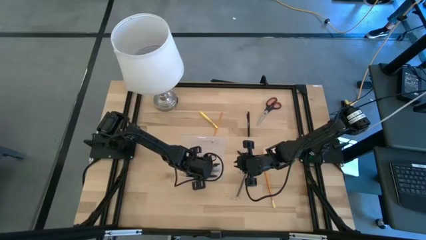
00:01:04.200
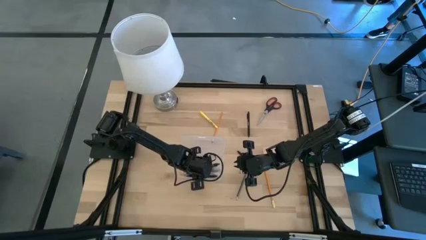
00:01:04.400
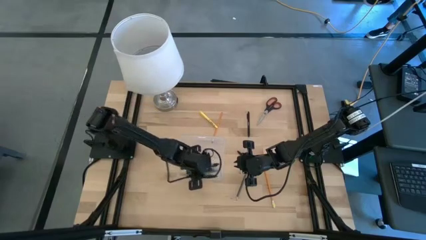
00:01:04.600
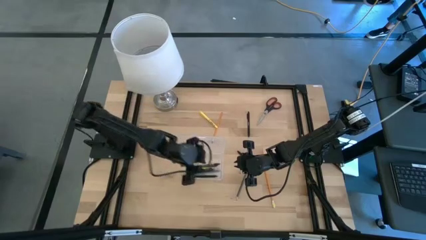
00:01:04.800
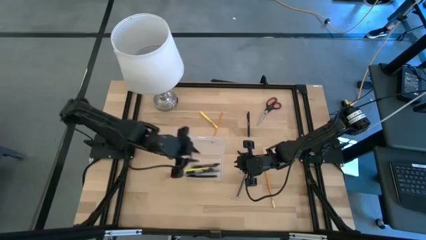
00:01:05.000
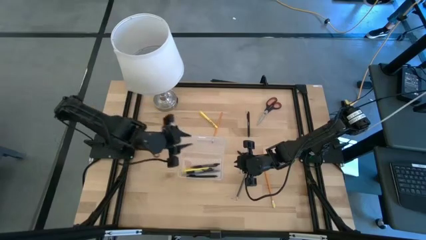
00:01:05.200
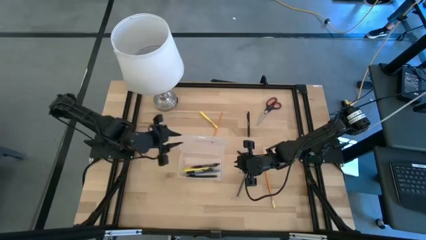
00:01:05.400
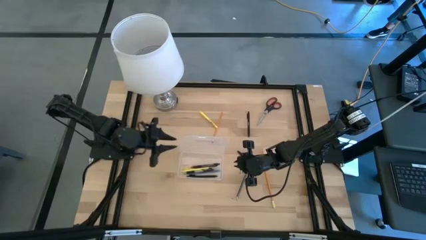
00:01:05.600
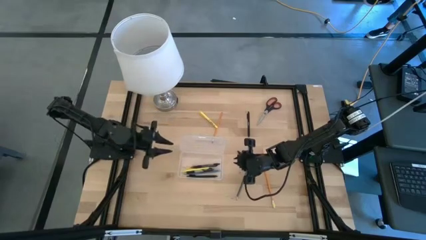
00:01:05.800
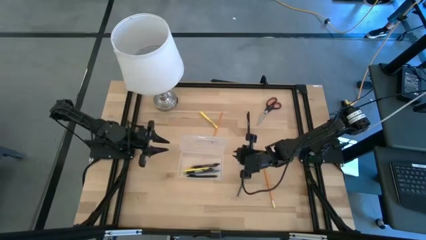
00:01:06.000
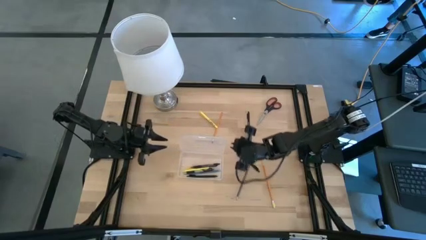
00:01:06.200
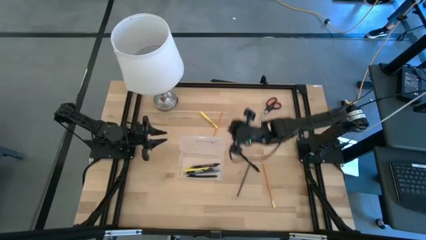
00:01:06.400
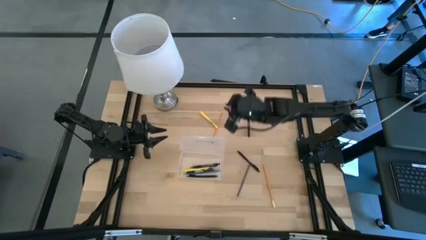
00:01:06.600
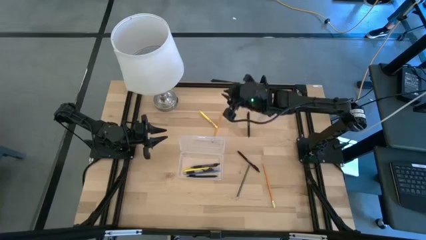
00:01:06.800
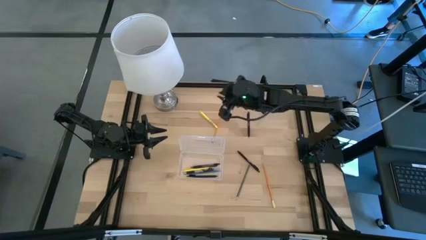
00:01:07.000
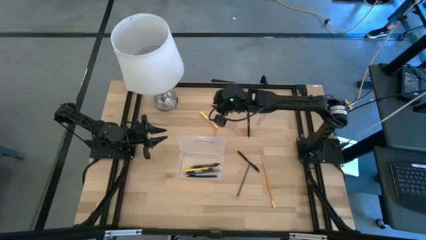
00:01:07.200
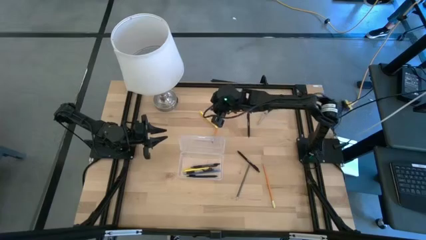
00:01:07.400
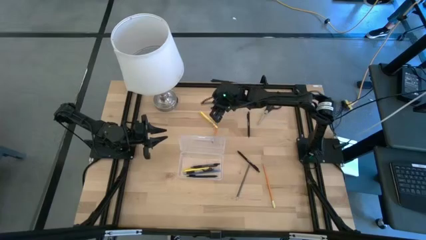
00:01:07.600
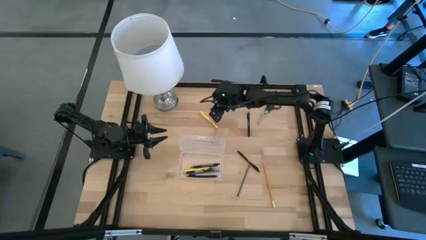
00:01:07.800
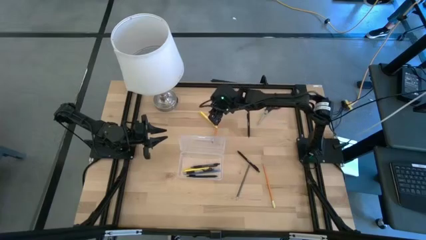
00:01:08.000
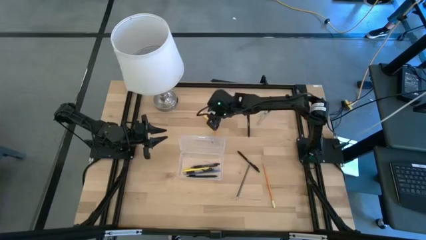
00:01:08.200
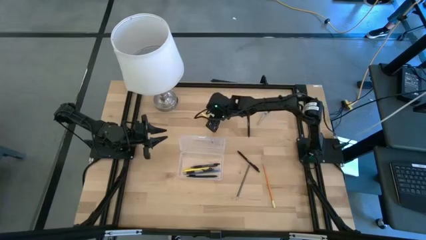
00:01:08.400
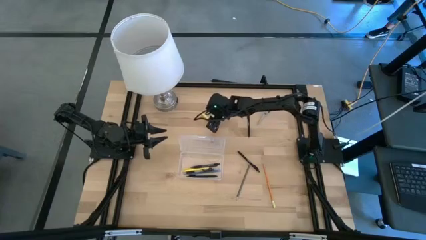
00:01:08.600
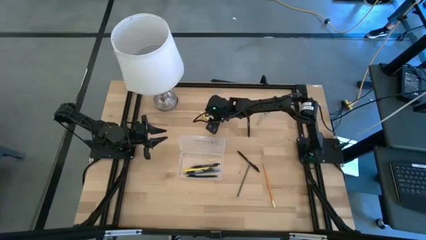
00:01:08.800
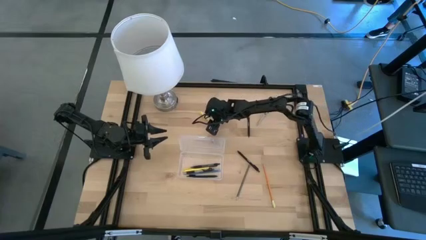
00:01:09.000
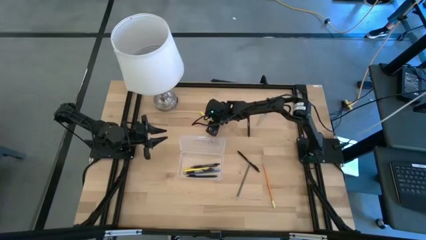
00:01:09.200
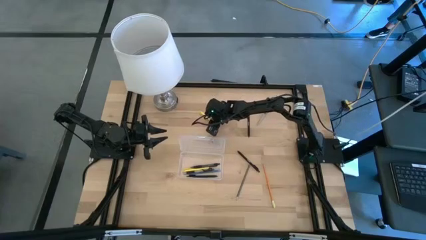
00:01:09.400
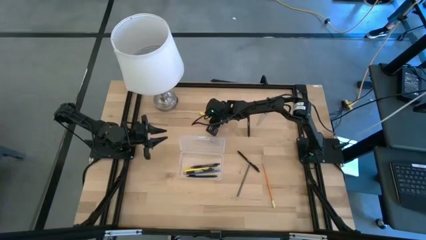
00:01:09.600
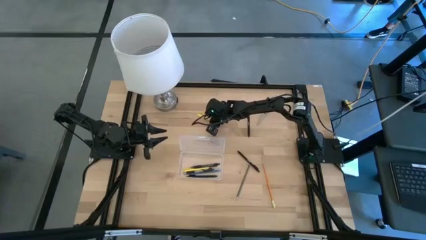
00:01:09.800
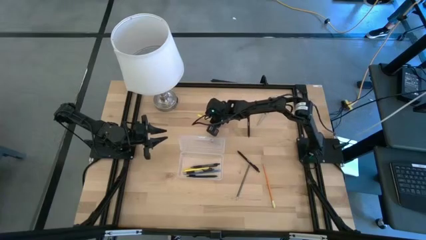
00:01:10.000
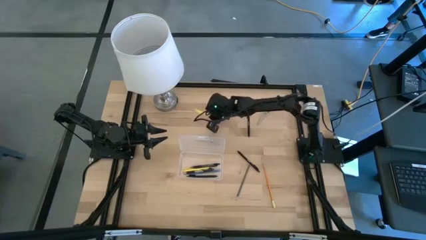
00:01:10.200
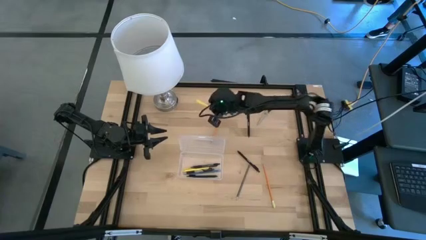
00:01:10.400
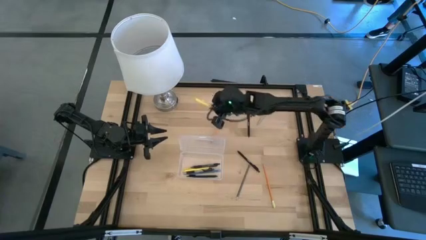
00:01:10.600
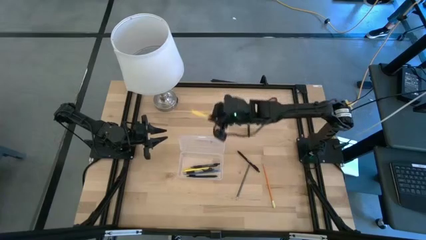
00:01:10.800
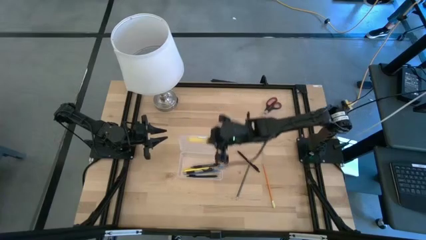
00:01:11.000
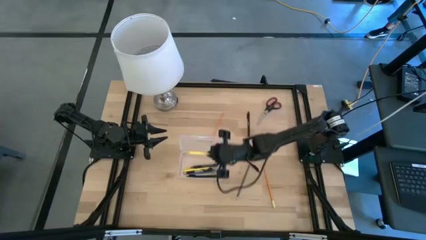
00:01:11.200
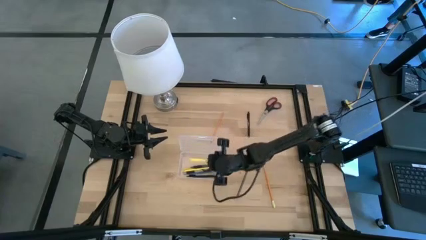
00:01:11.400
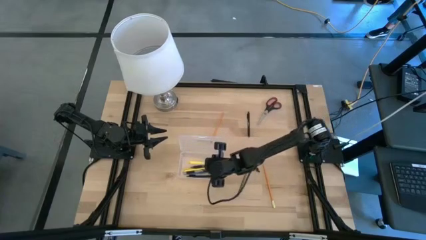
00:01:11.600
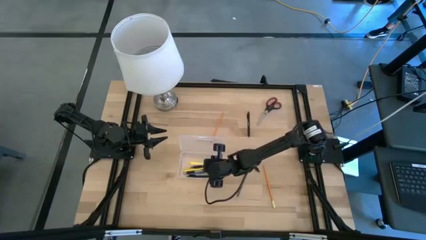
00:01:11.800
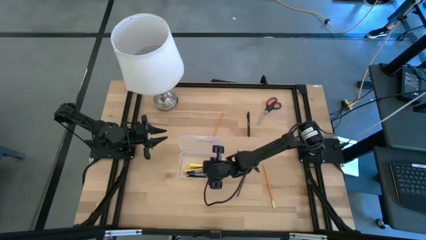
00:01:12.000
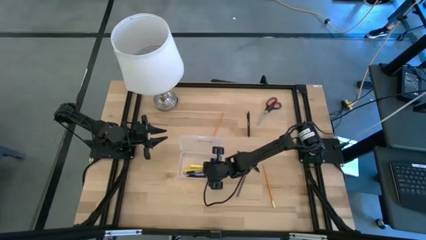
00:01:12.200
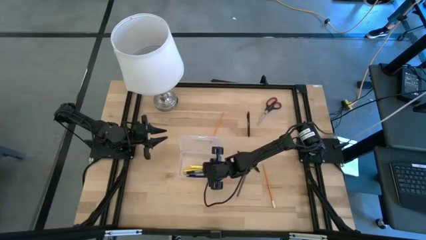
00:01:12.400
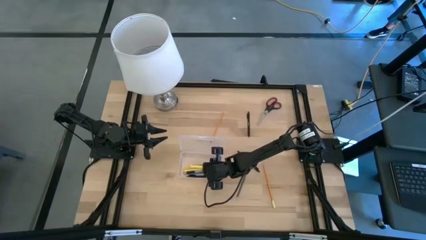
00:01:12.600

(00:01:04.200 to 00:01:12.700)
Task: Pick & place school supplies into a supply box
Put the yellow pen into the transparent supply box

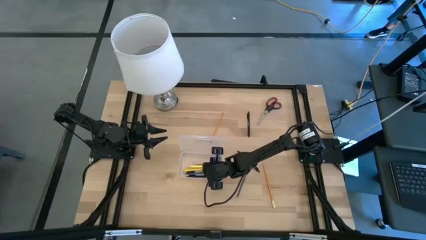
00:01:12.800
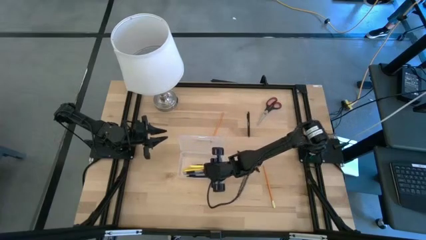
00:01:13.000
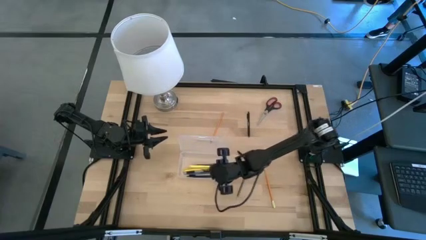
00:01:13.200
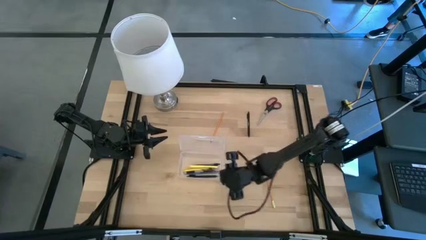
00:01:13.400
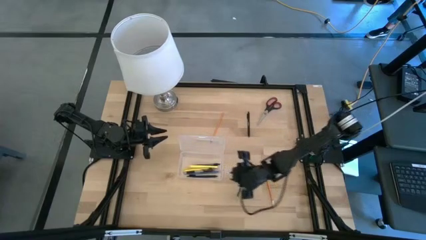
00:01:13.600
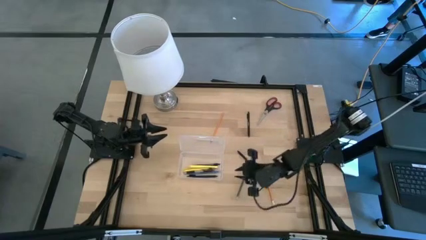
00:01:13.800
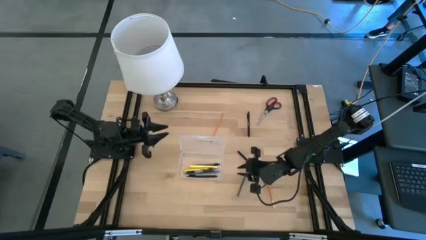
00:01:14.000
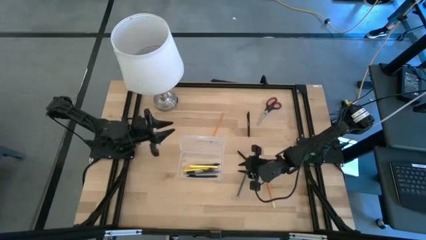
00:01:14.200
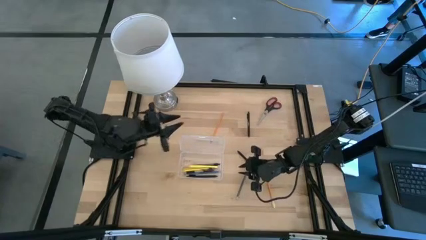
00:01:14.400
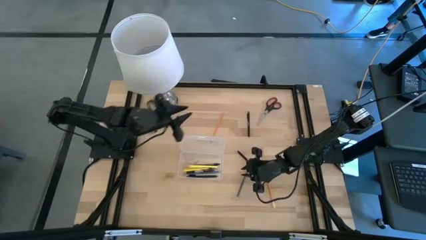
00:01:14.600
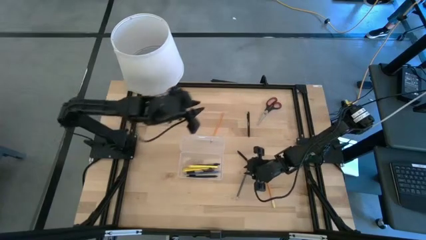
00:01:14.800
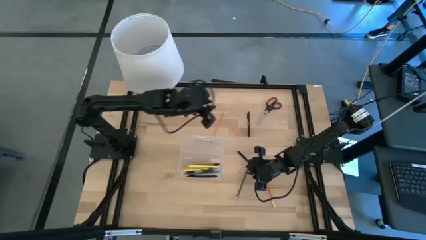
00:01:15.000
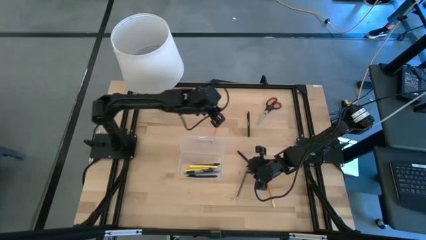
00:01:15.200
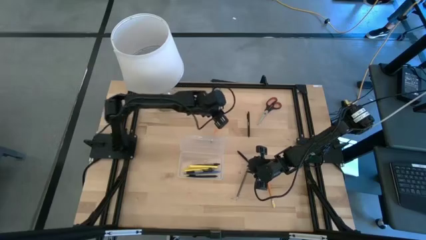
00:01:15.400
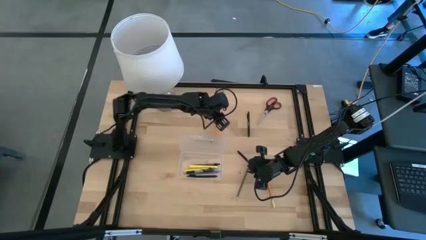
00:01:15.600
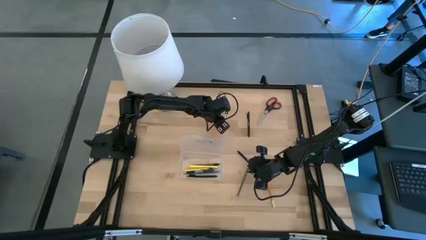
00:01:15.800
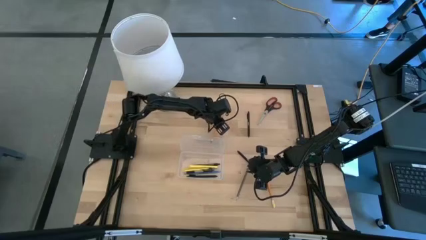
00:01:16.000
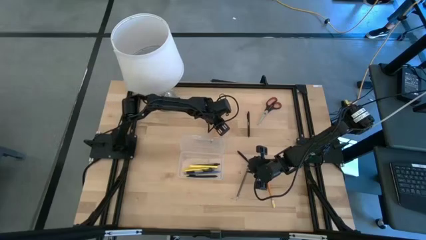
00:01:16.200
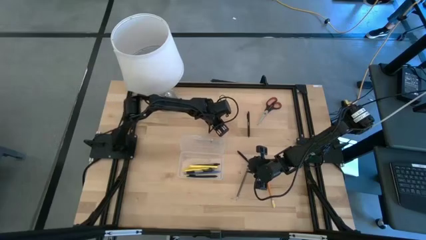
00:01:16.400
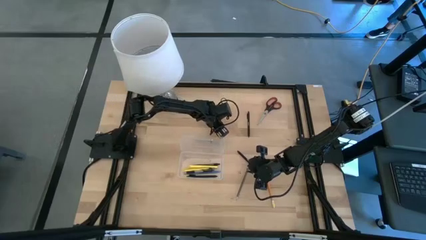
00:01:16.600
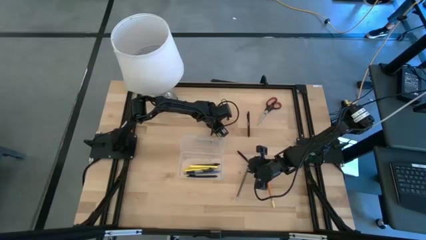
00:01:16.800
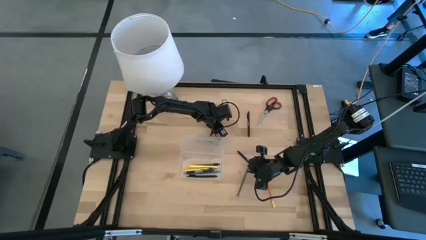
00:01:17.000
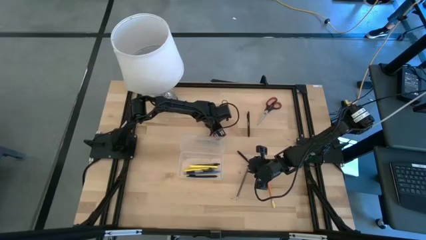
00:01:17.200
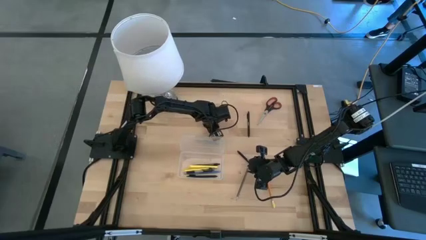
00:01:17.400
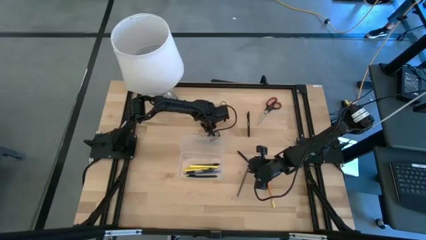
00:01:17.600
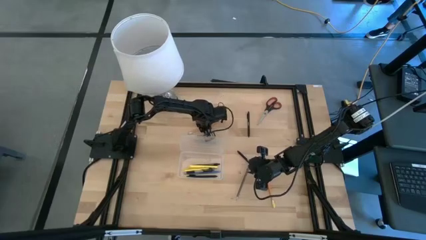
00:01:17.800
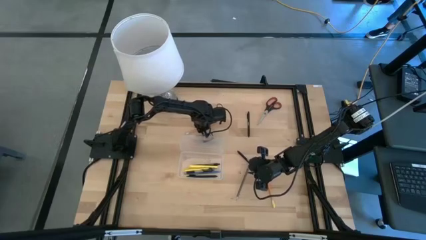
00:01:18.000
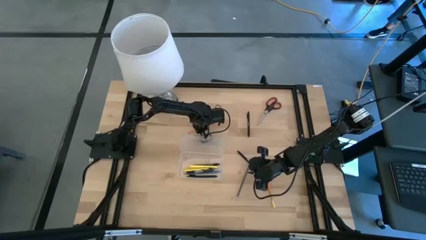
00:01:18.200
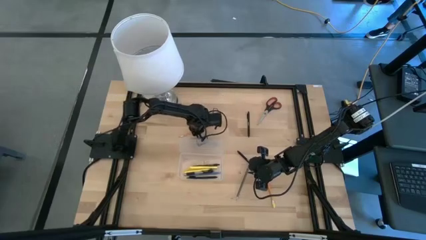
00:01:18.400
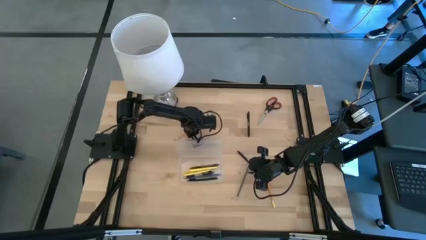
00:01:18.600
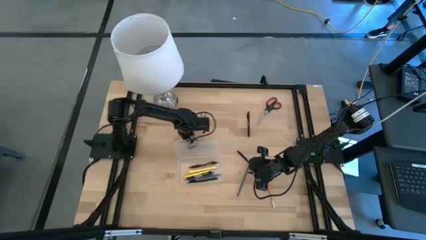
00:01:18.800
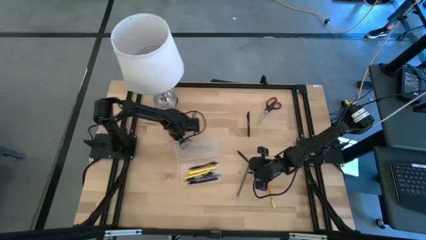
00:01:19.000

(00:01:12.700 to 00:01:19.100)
Put the top orange pencil into the transparent supply box

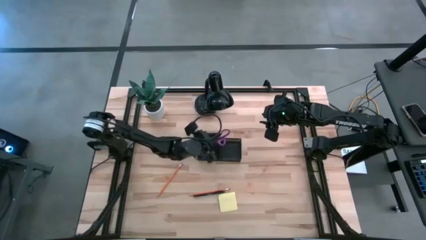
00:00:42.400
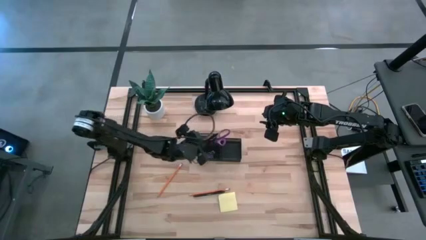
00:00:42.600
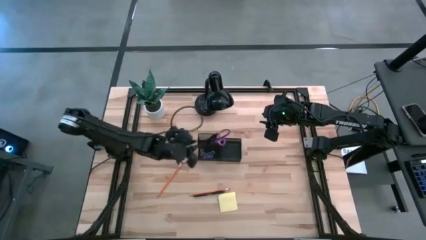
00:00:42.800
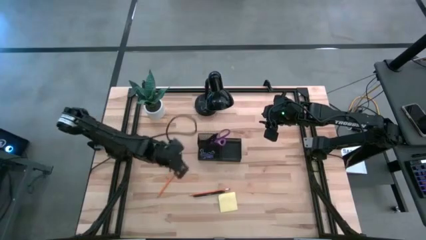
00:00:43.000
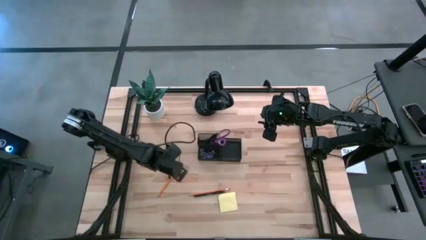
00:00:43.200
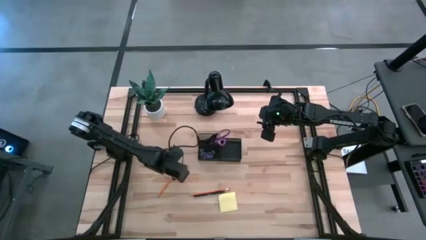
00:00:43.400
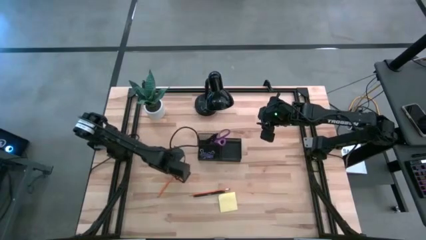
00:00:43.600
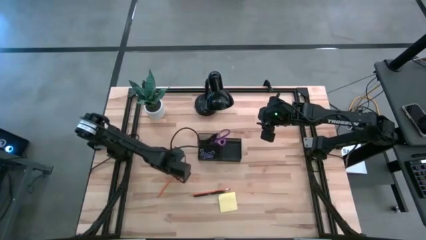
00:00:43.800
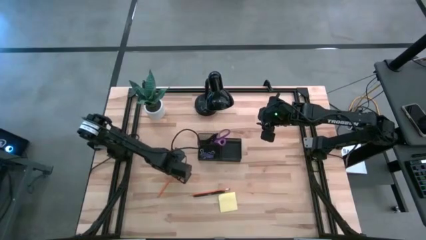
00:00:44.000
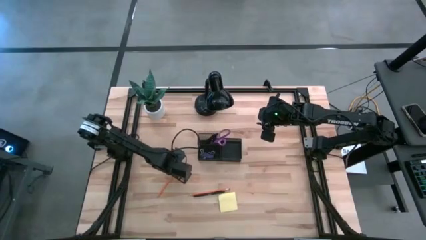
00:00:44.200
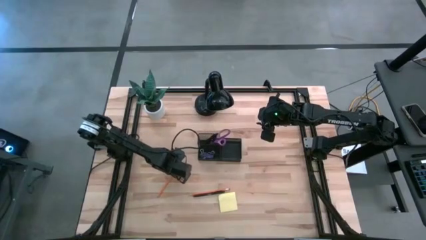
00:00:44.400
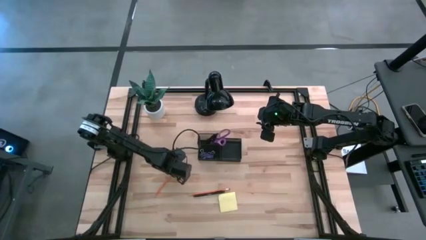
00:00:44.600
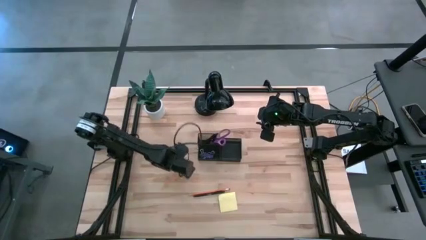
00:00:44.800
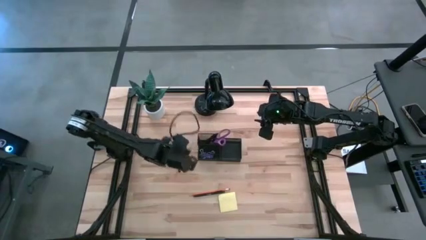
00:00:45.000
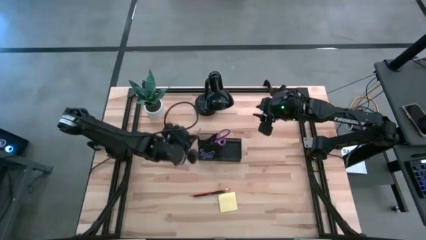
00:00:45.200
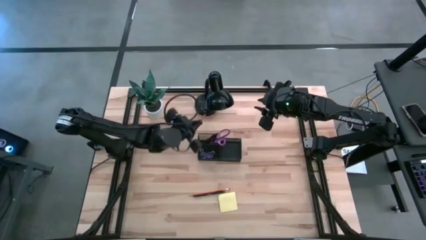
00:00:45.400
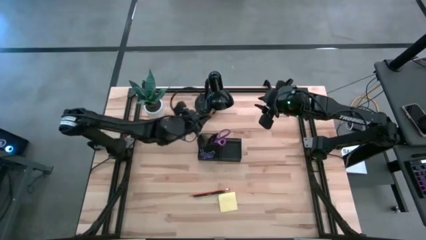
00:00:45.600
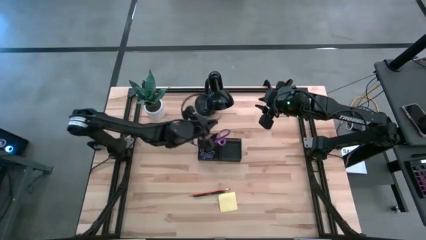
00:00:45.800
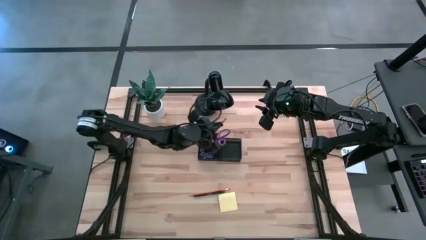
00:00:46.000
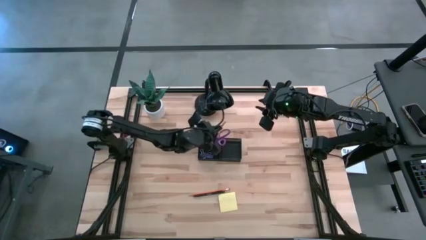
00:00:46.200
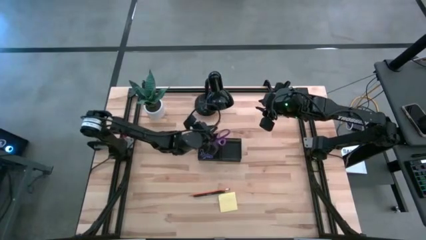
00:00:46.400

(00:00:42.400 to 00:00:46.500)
Task: Pick and place office supplies into organizer
Put the left yellow pencil into the black desk organizer
